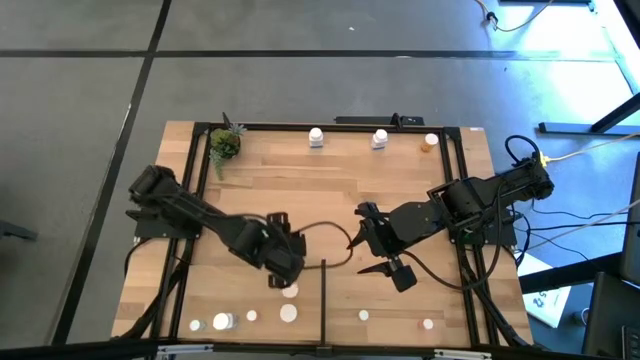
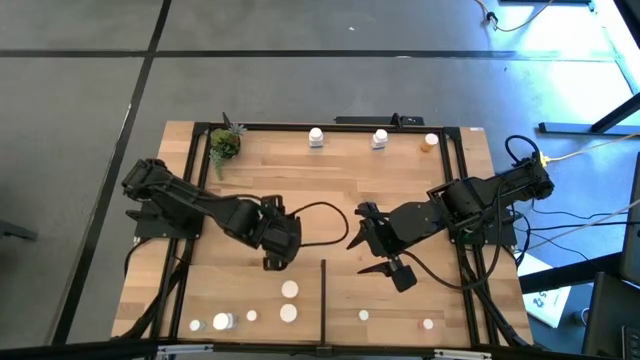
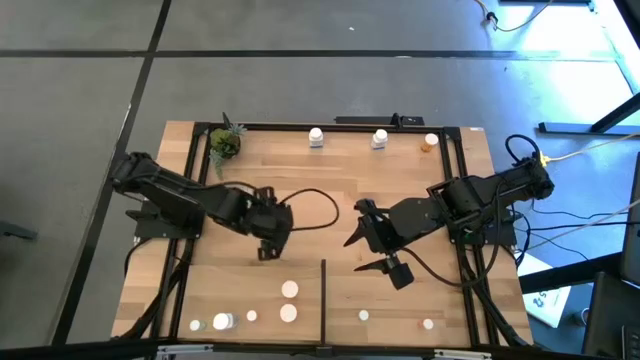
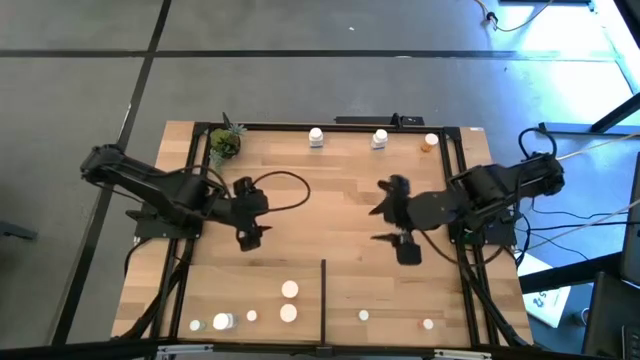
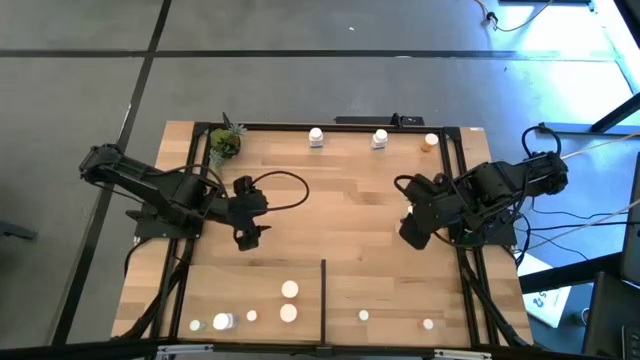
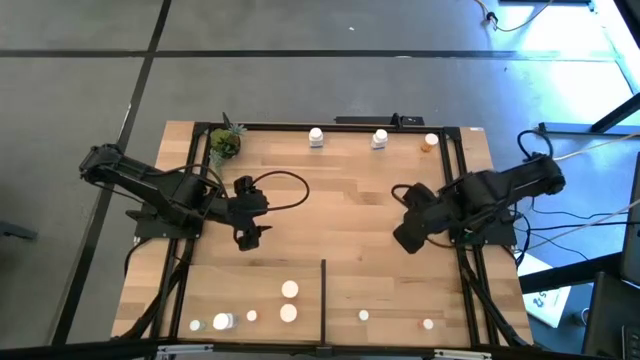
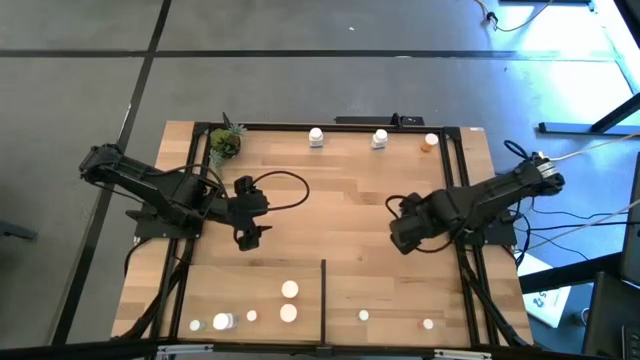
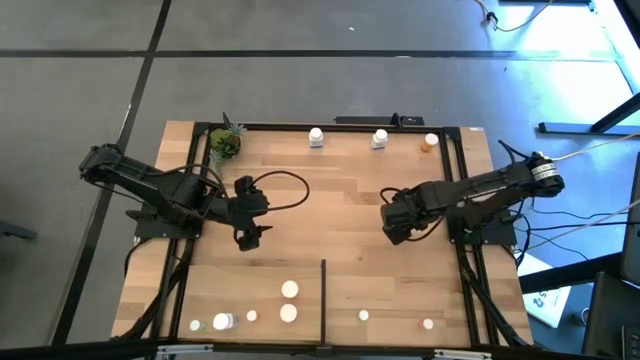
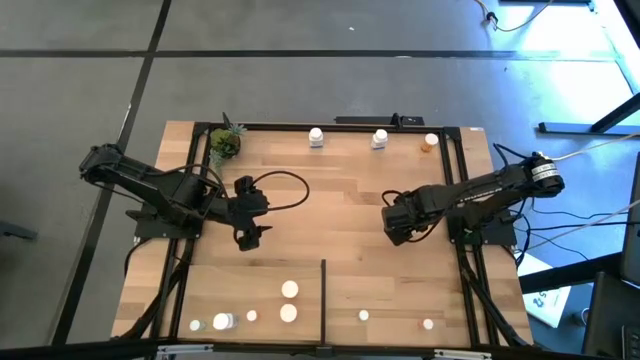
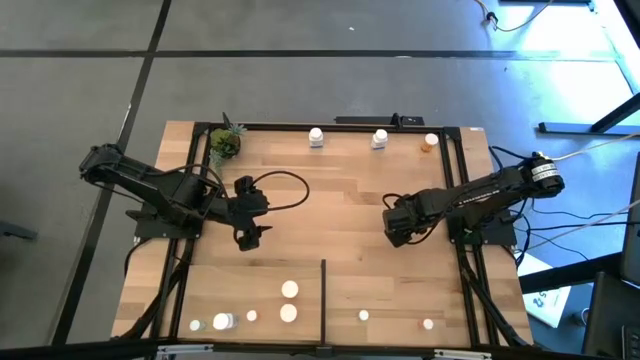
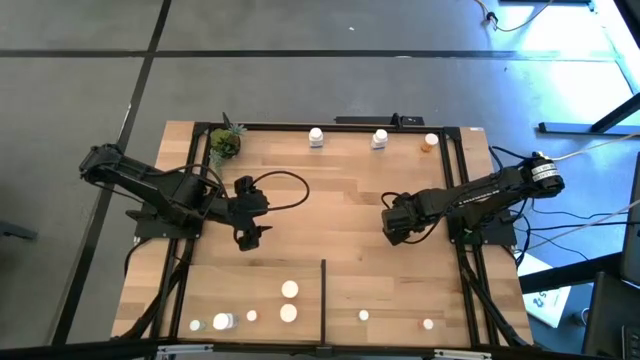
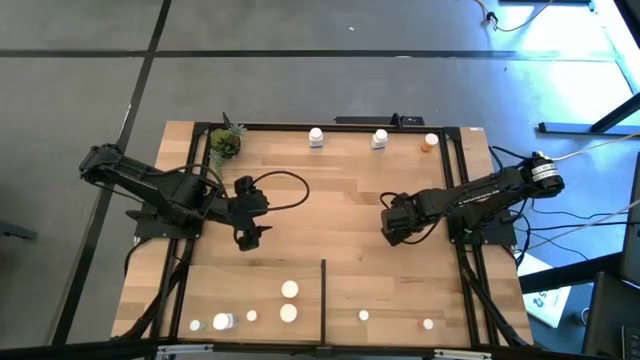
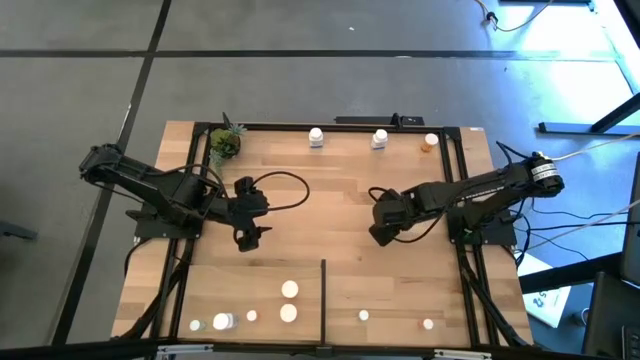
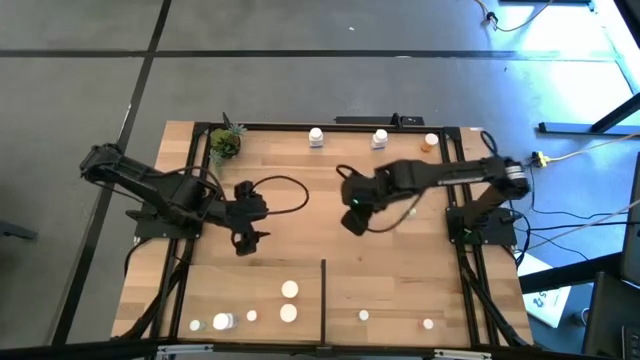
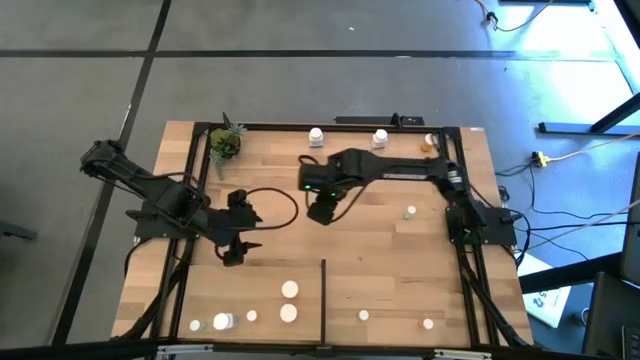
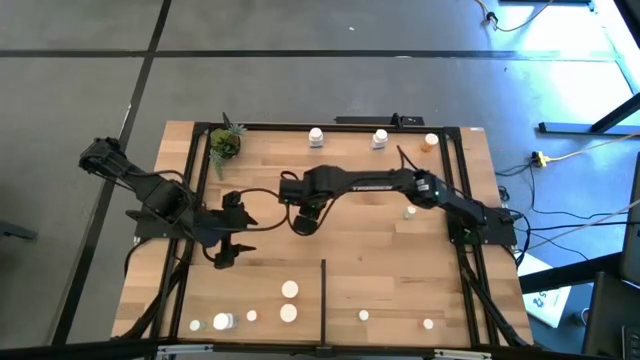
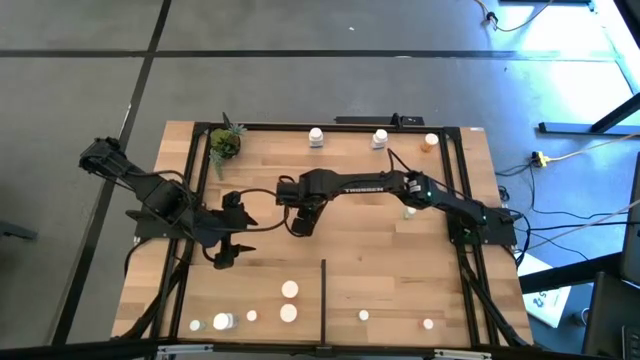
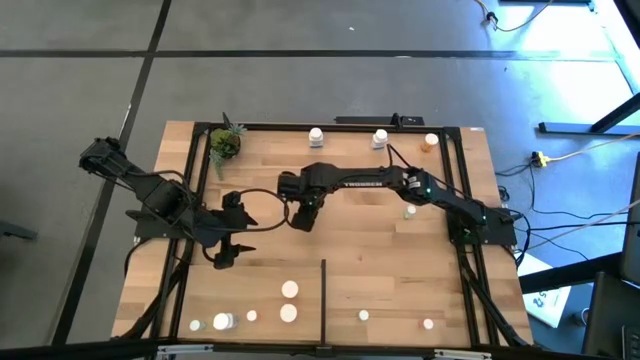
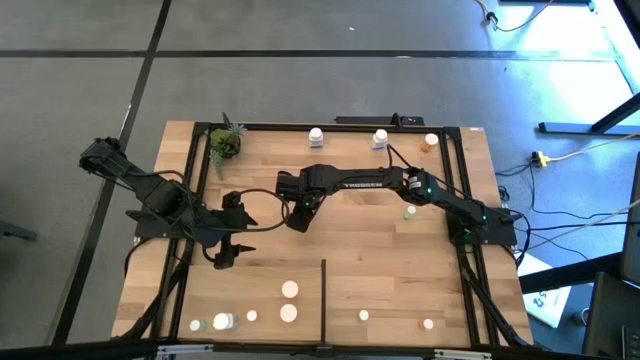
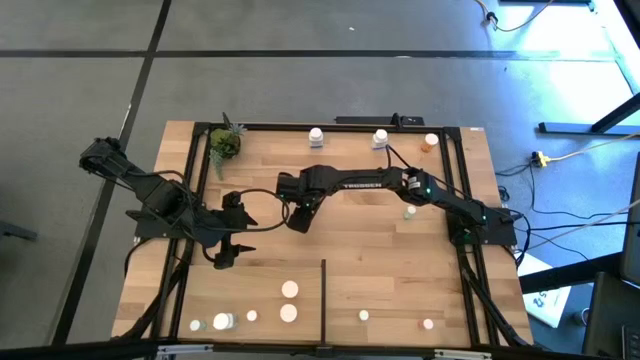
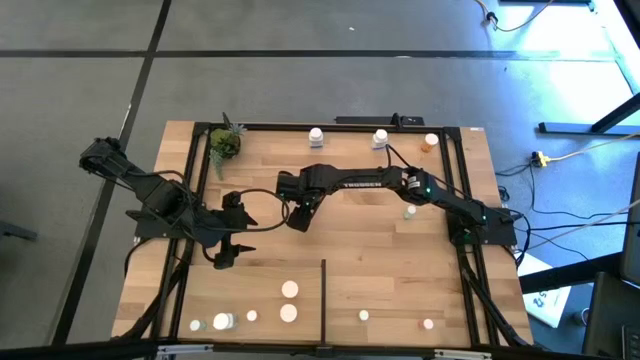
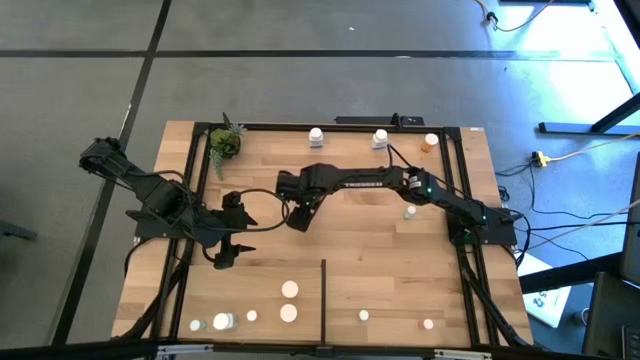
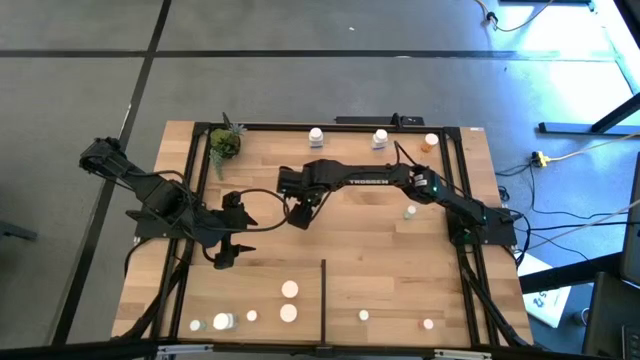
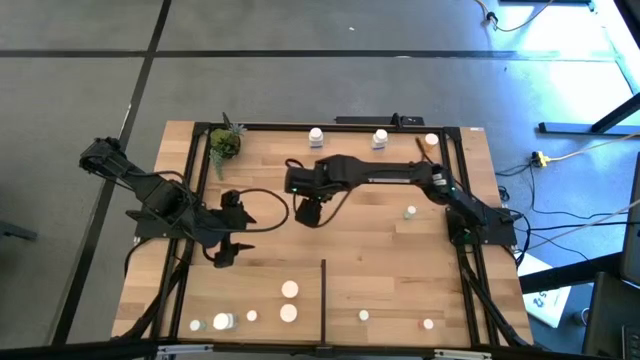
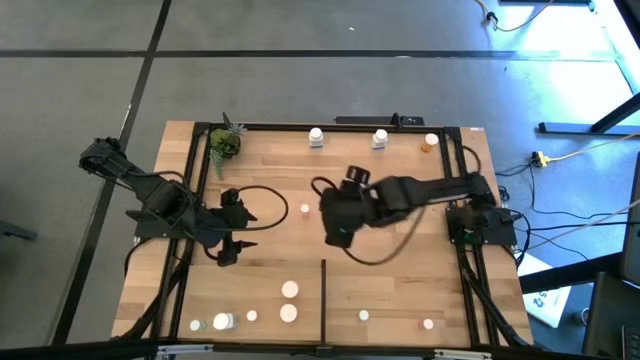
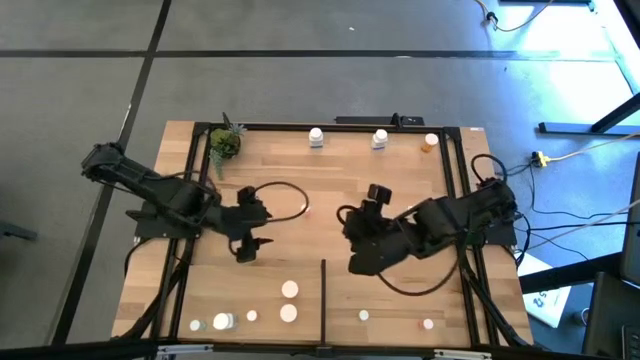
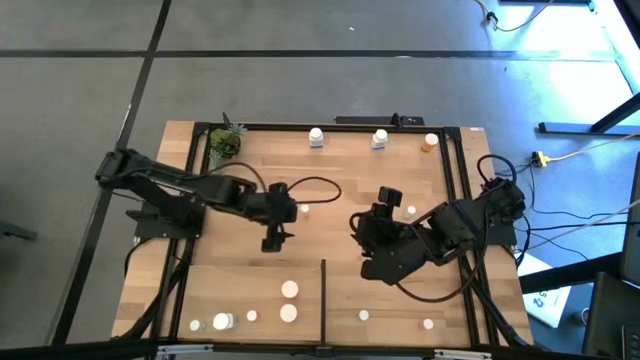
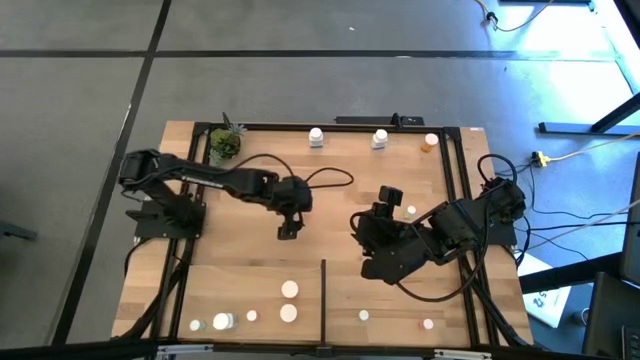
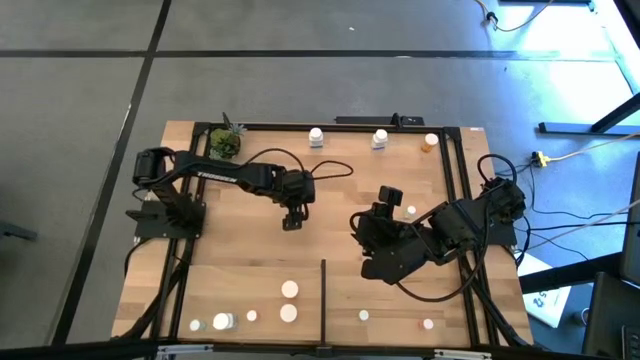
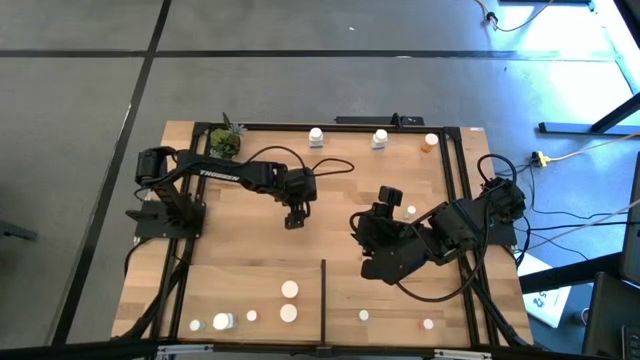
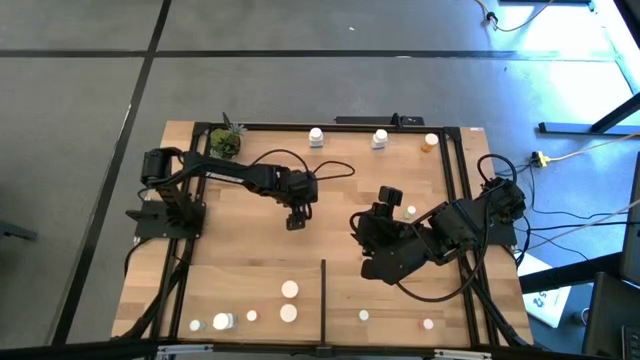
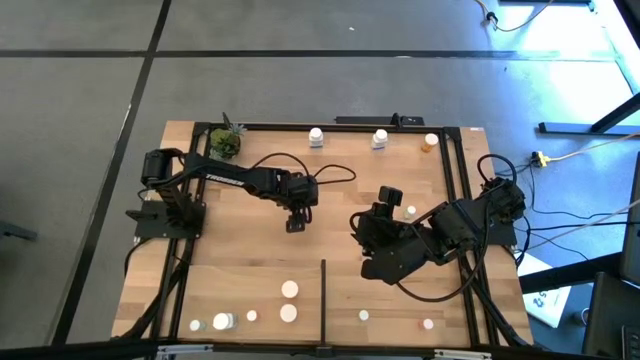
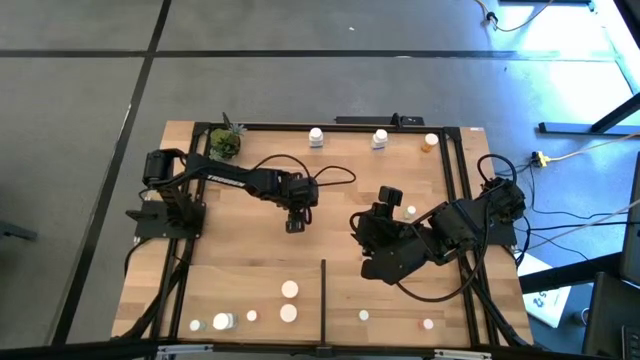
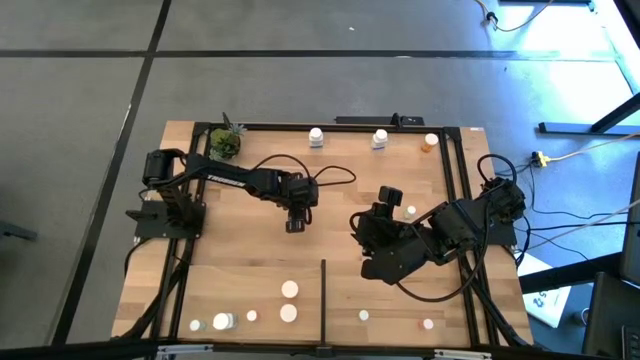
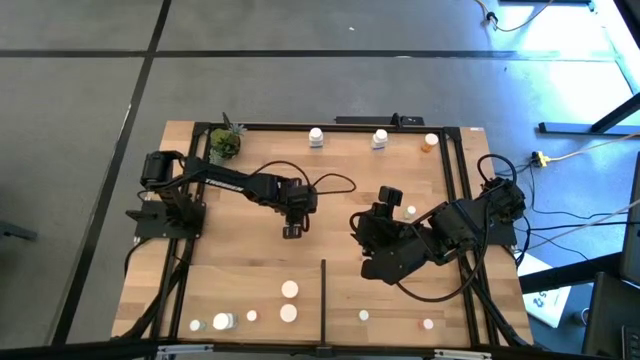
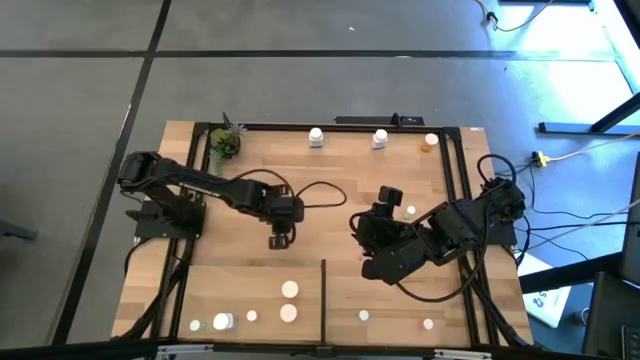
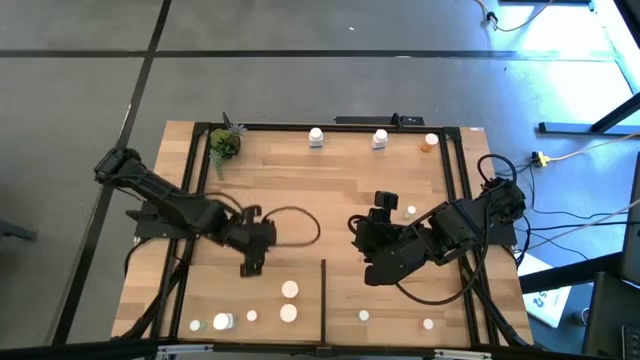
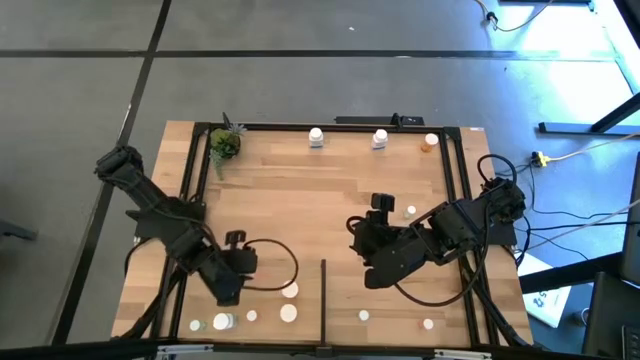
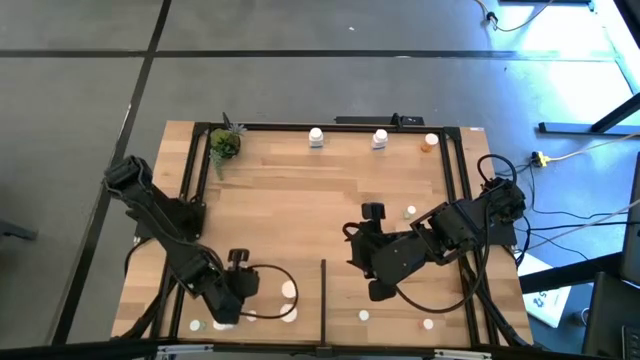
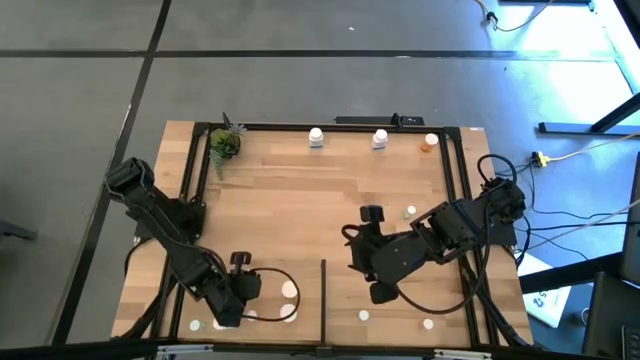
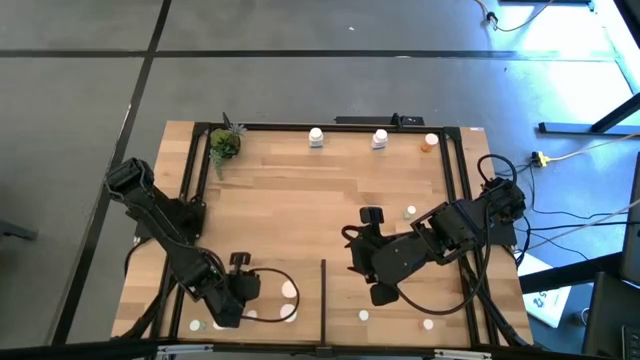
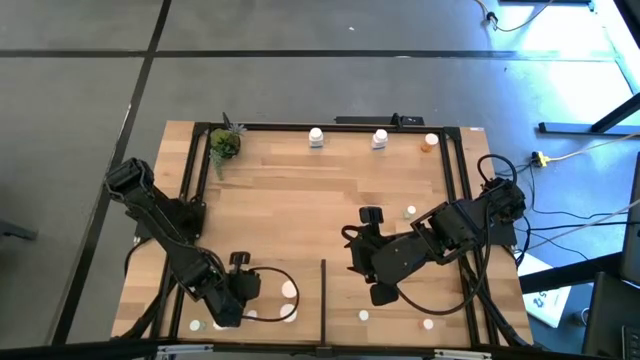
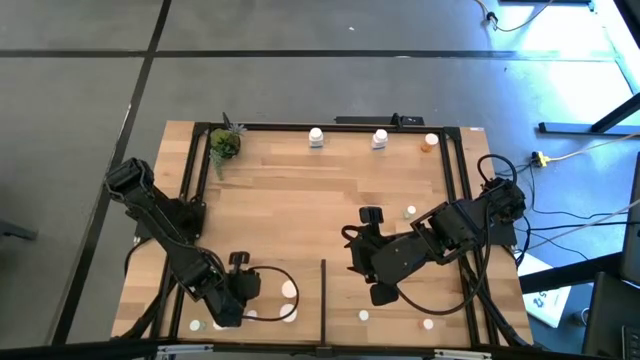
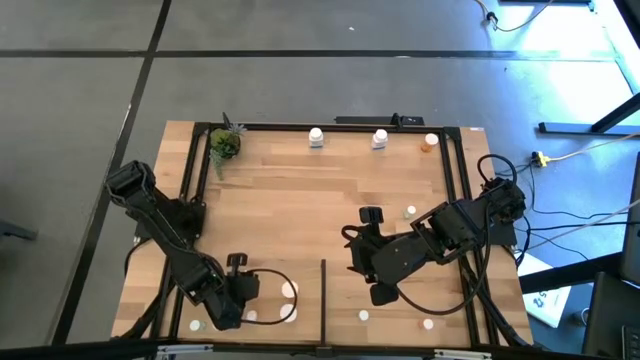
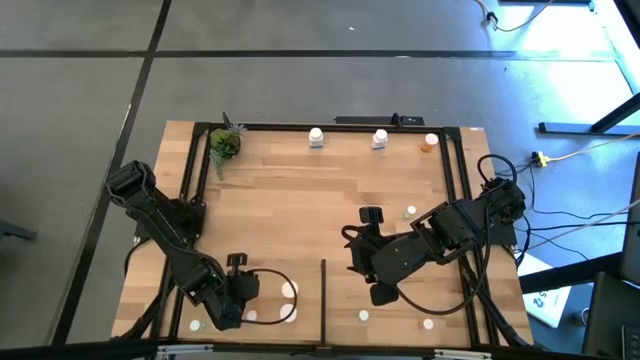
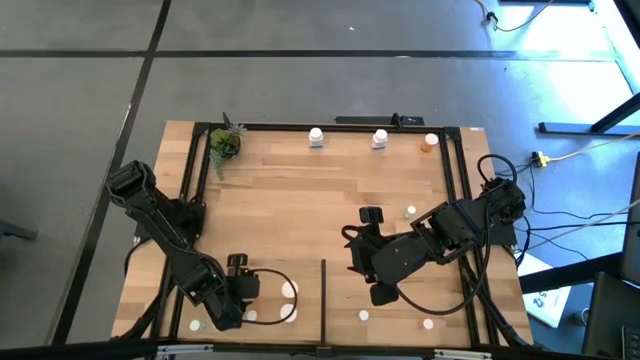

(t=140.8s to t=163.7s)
Task: Pick and place medicine bottles onto shelf by color
Put the top pink pill bottle on the shelf aligned with the other pink pill bottle
